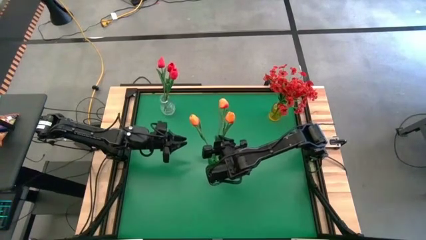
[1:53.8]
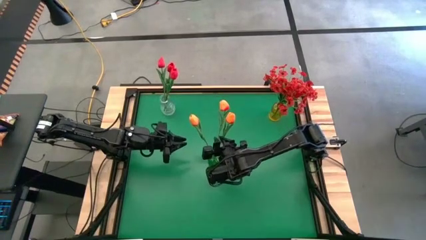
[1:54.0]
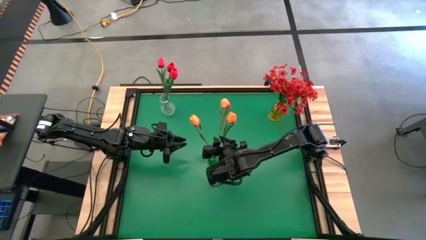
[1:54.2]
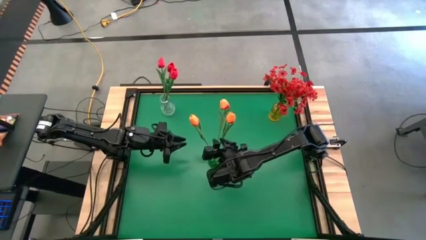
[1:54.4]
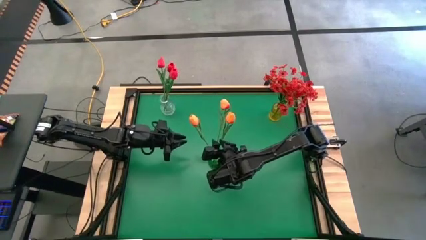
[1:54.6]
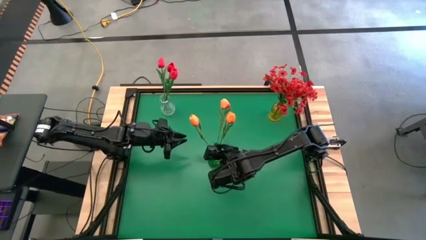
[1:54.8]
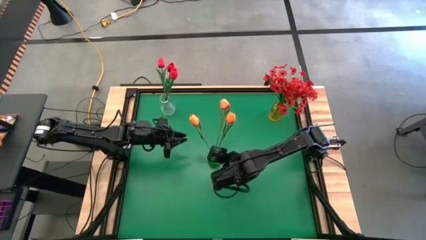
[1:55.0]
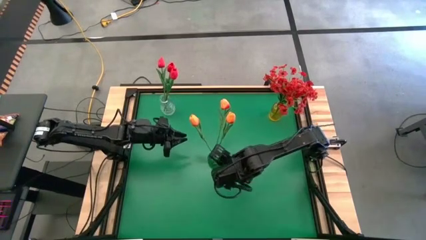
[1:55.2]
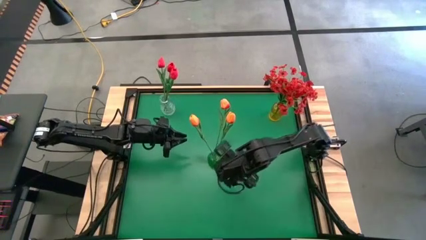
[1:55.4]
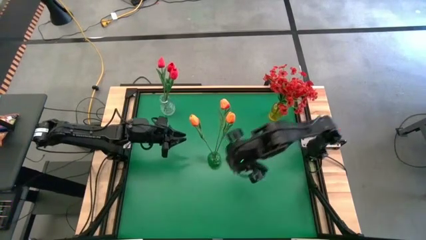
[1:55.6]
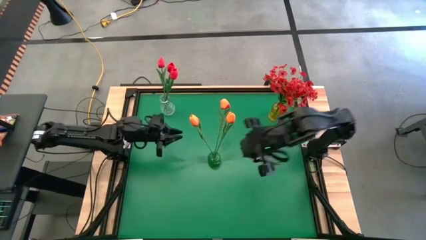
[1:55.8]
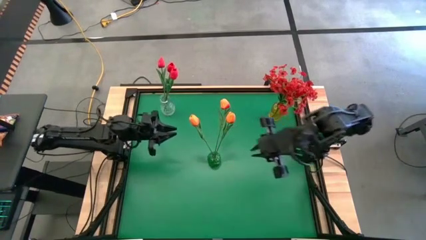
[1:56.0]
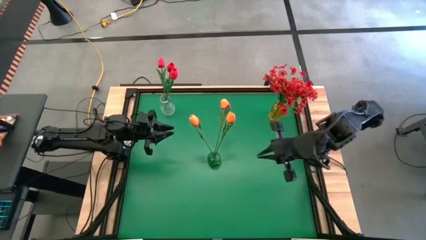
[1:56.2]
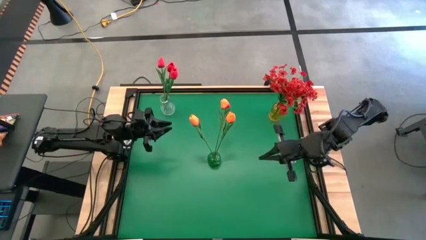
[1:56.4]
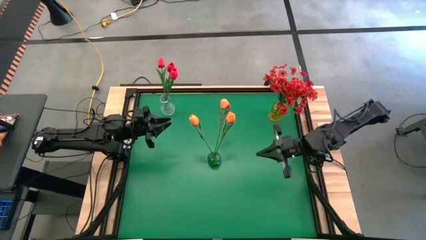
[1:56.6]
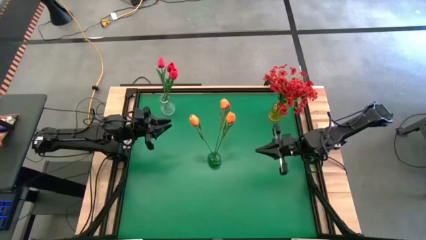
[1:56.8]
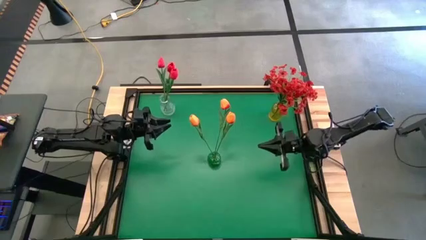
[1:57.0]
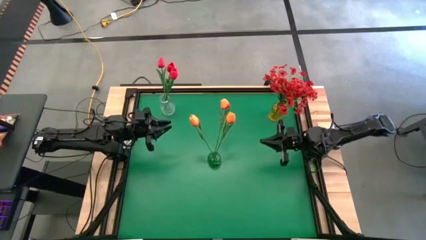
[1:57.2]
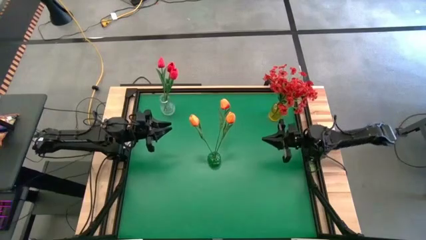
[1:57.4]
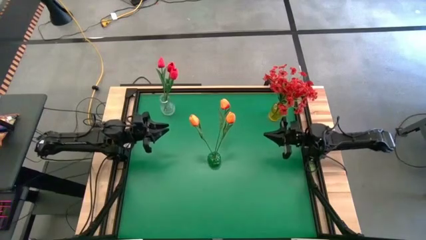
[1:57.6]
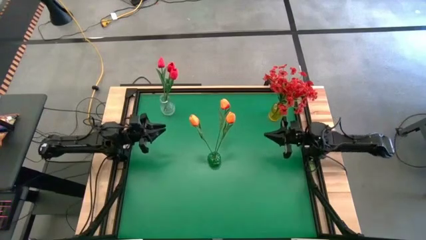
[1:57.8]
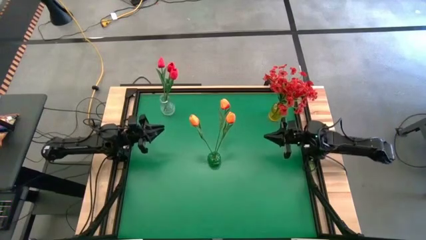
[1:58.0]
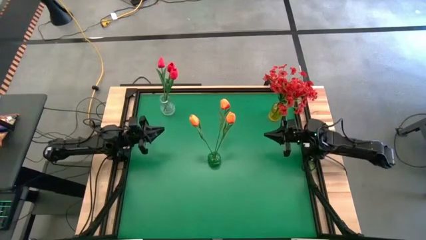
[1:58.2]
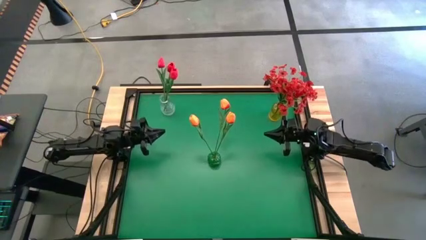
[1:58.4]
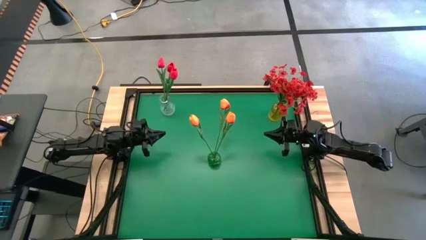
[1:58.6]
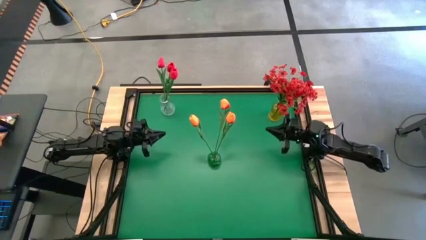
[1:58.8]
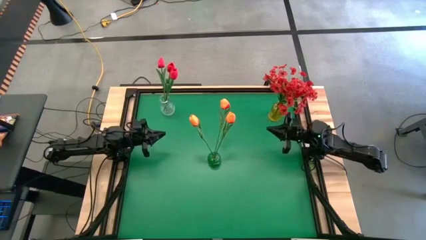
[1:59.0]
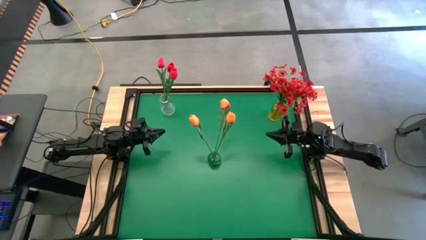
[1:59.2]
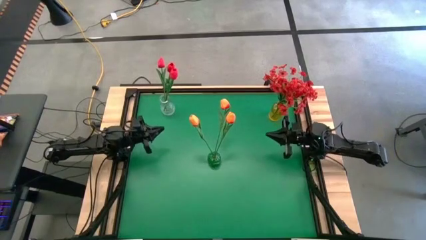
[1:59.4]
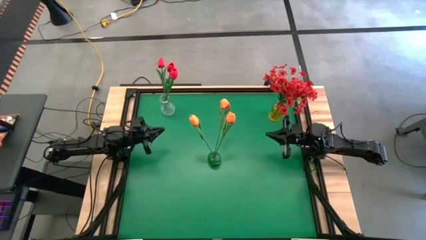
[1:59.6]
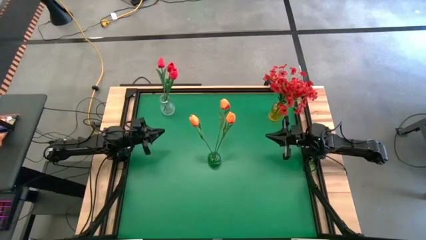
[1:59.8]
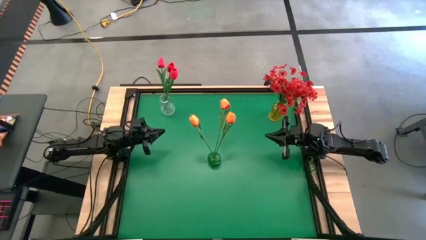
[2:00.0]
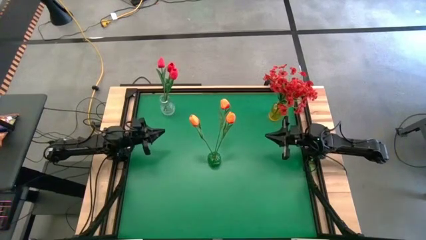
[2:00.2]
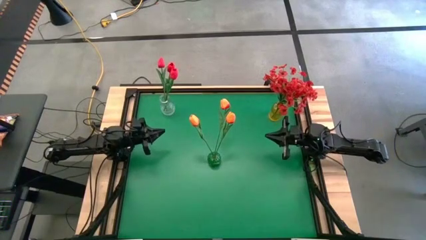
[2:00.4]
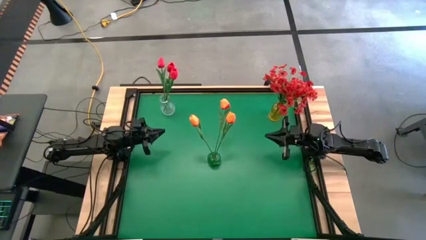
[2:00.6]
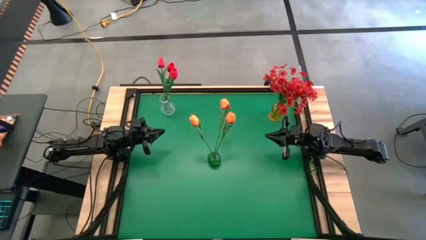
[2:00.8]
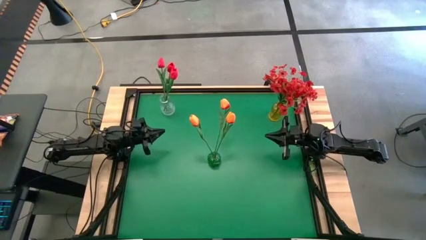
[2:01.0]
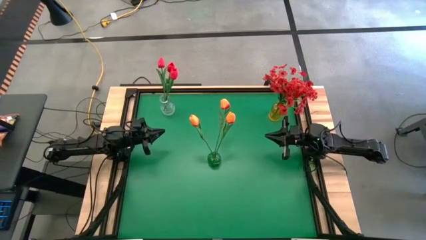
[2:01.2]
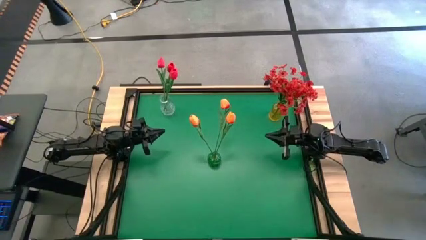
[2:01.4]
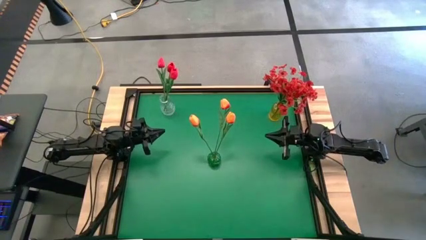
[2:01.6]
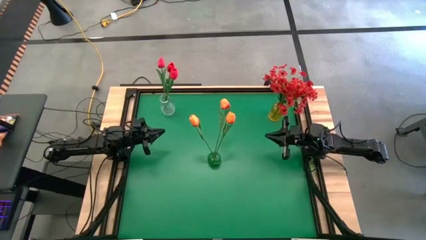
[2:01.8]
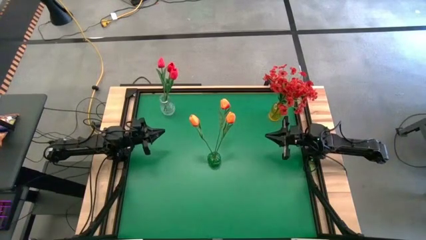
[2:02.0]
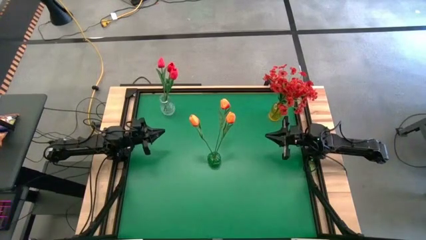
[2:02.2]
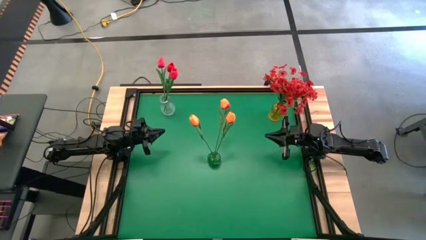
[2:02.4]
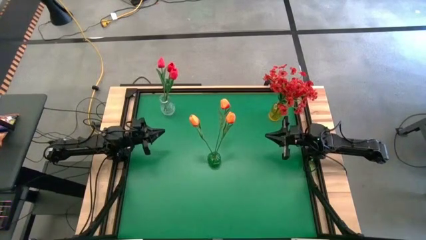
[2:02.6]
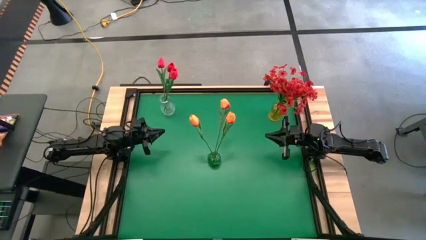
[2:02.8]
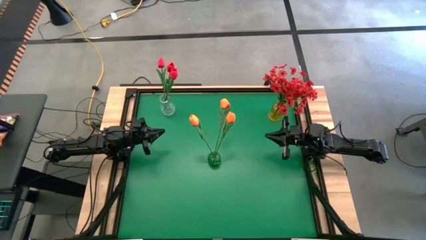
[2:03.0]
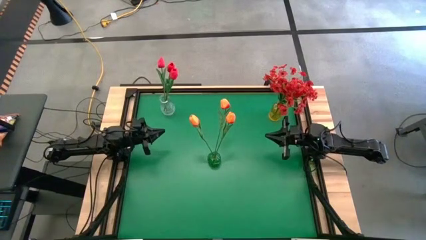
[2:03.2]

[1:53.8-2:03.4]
Task: Sort flowers into vase by color
Return to Home Position

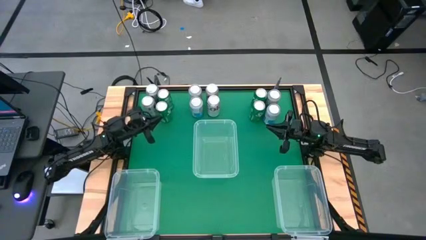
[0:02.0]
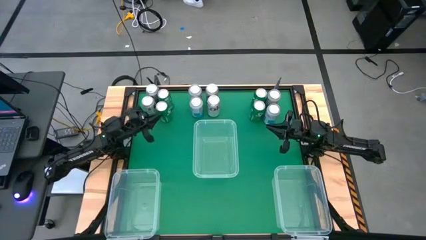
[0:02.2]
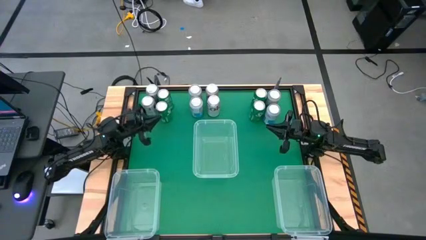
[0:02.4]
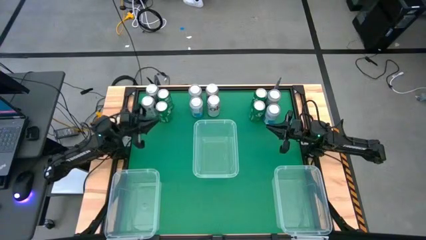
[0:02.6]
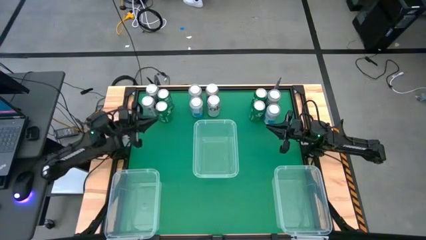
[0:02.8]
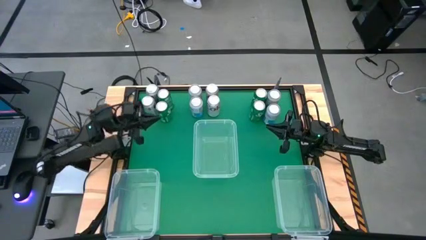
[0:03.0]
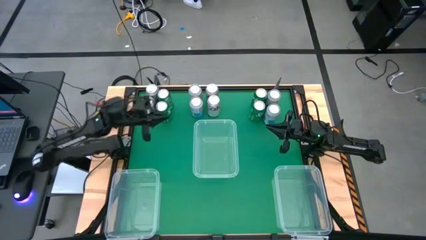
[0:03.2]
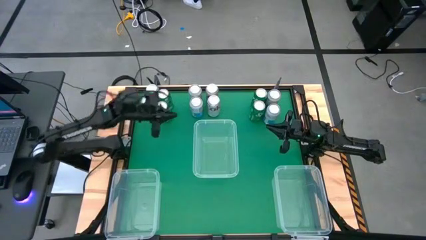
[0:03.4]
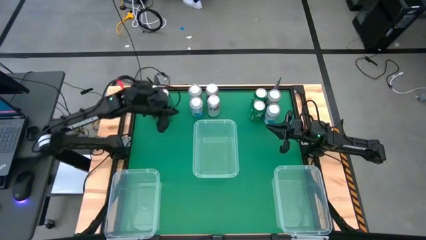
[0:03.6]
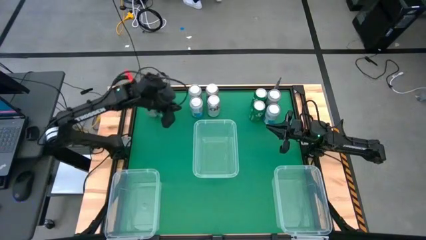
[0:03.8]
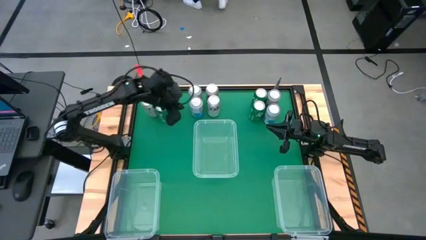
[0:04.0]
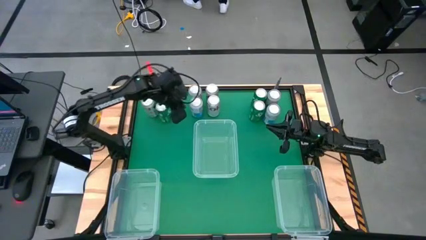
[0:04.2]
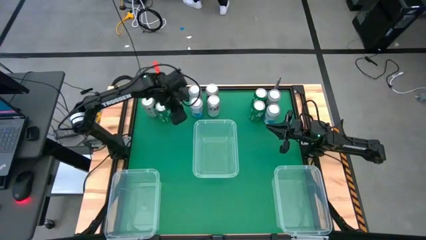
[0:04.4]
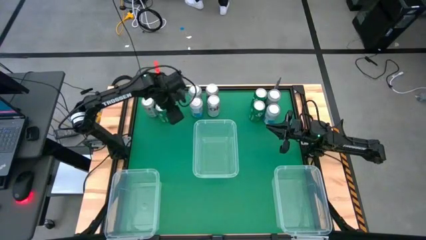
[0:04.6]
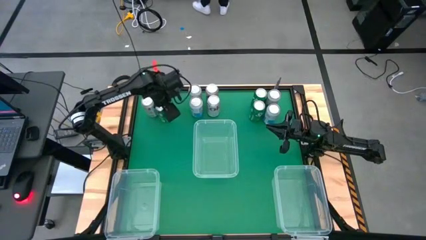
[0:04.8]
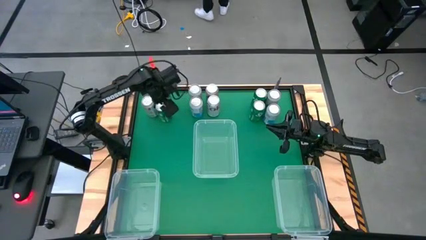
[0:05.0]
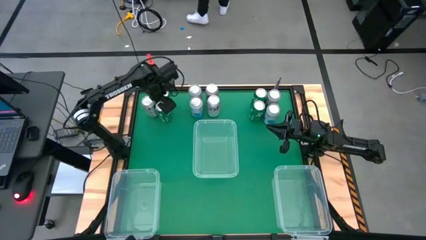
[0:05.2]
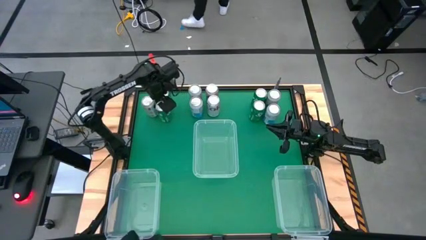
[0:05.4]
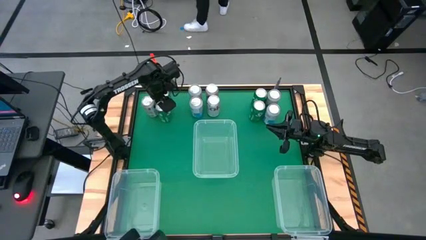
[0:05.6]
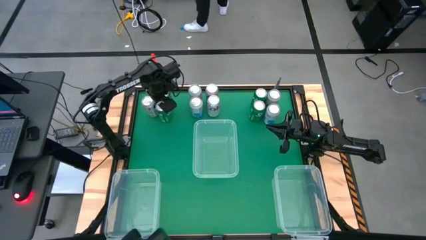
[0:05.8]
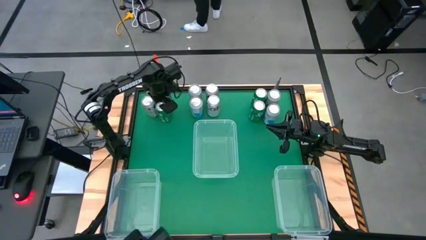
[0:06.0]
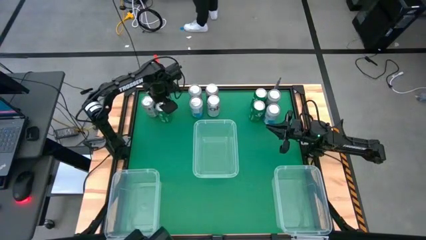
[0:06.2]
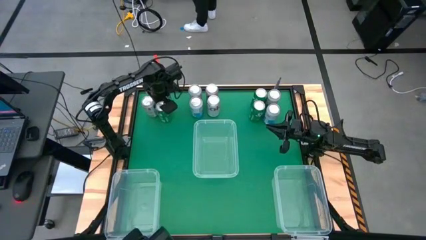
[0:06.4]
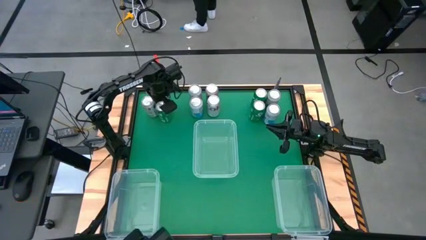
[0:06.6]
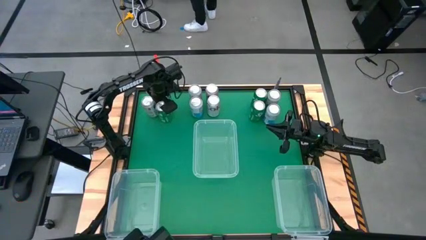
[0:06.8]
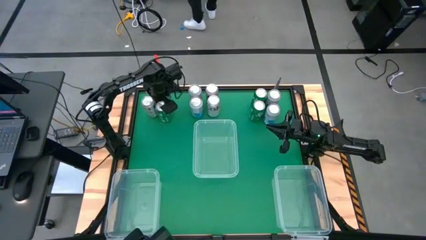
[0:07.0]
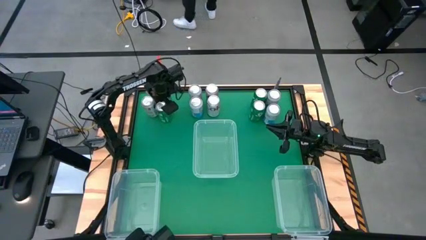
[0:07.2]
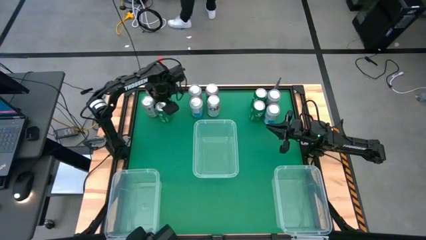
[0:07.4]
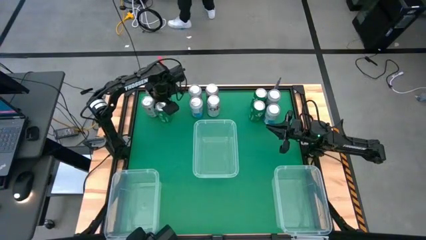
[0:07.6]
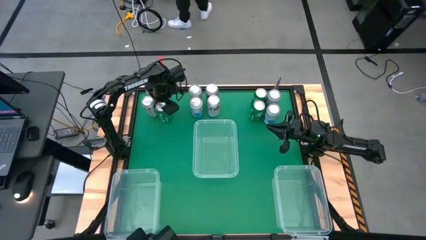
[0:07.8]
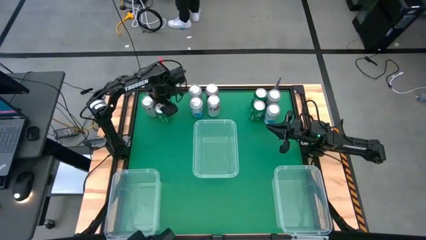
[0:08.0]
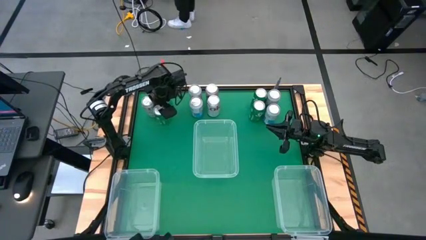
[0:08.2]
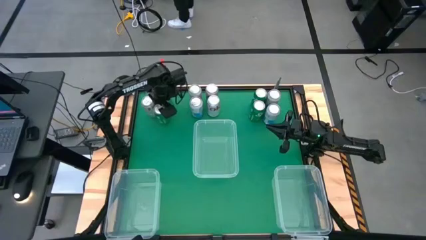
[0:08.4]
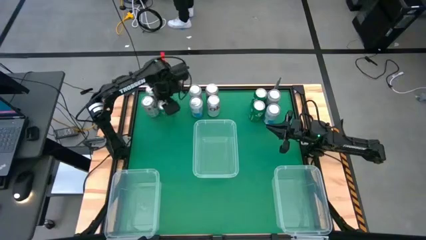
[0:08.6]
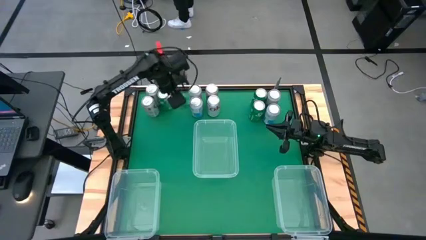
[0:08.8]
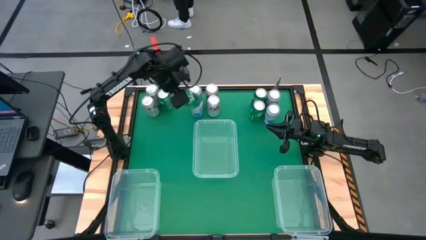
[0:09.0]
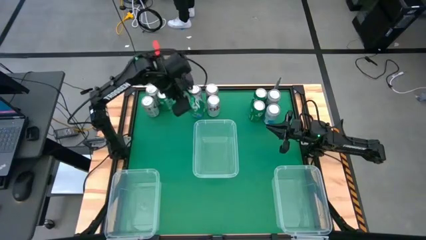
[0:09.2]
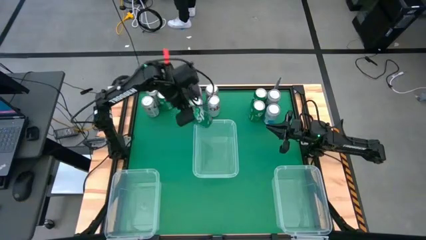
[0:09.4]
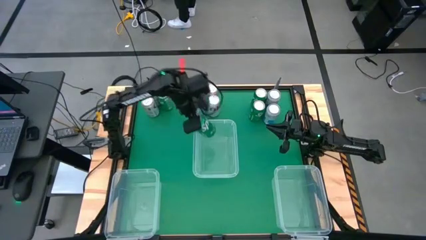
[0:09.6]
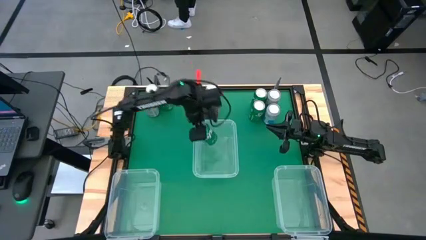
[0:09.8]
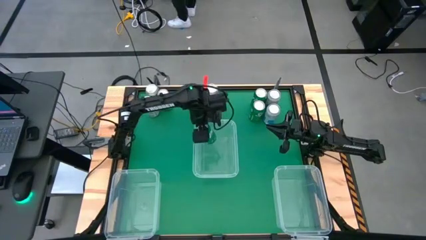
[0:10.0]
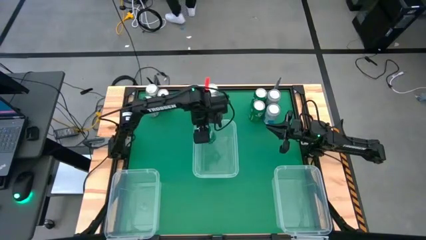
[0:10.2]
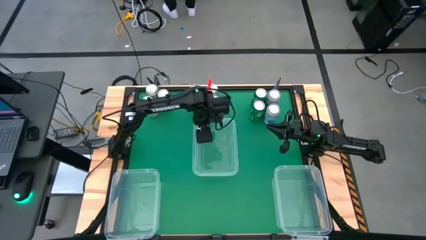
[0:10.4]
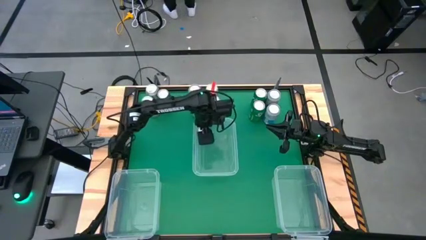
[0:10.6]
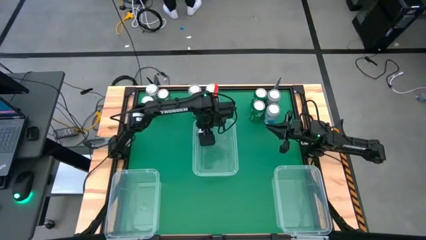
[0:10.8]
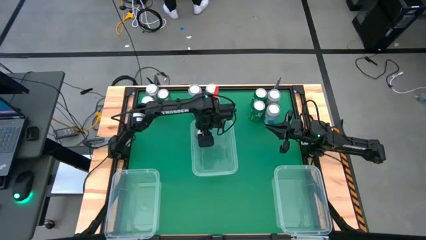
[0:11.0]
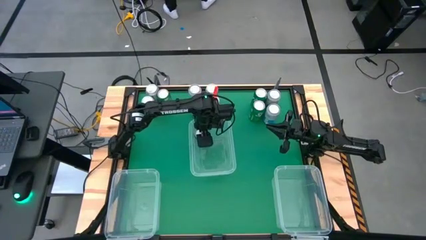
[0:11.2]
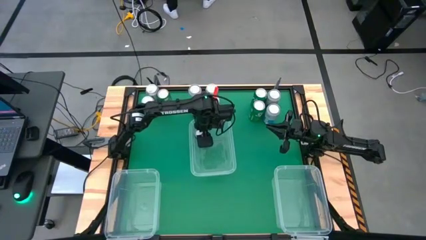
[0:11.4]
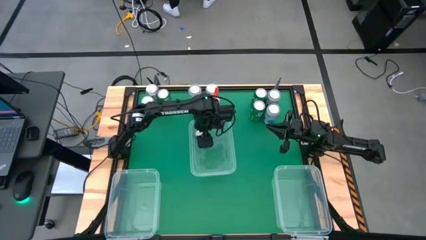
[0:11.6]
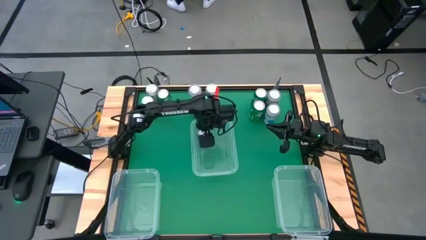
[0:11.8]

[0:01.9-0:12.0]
Task: Sort soda cans
Put the green soda can into the top bin
